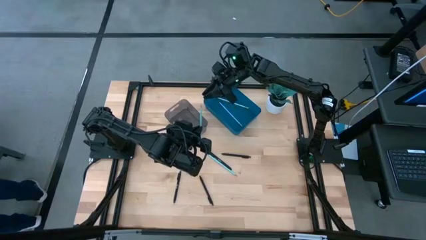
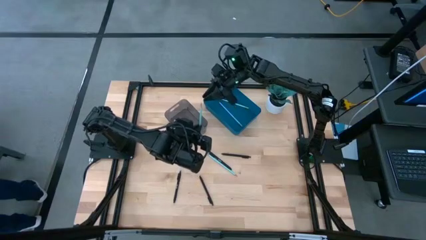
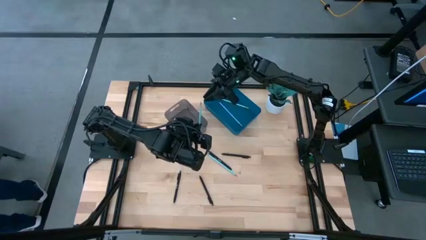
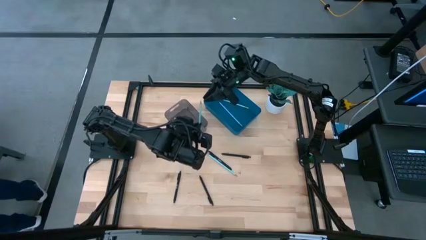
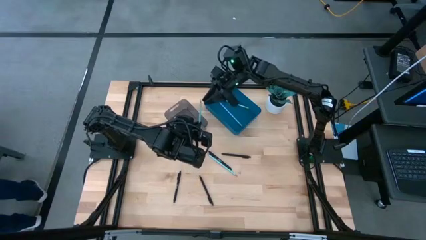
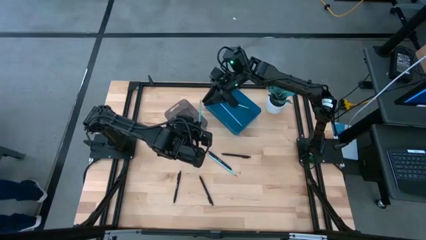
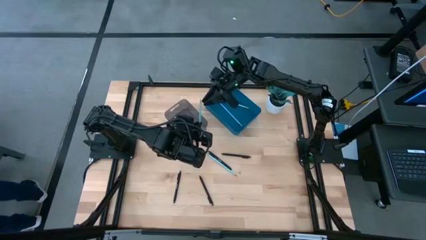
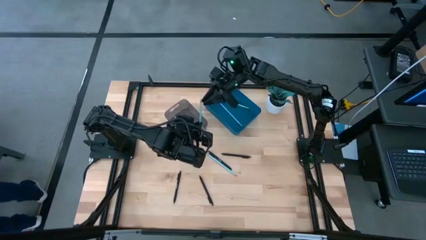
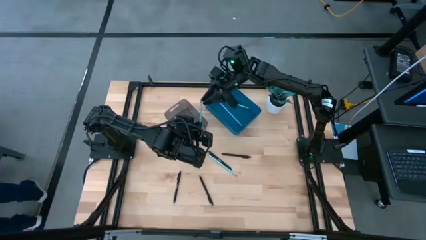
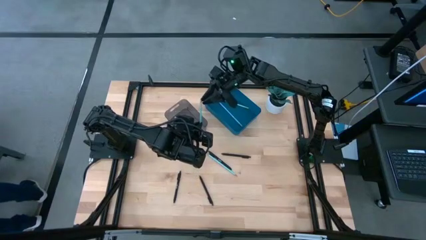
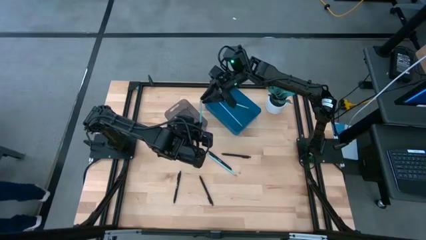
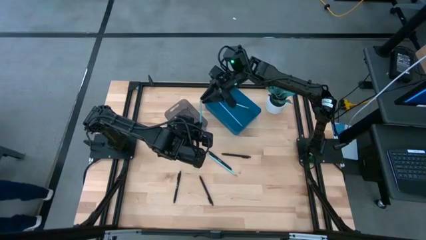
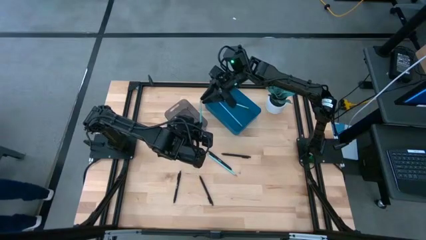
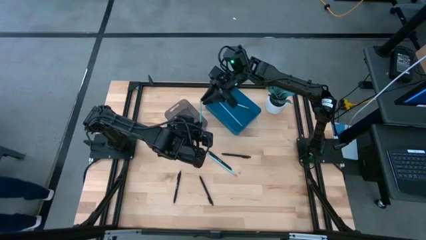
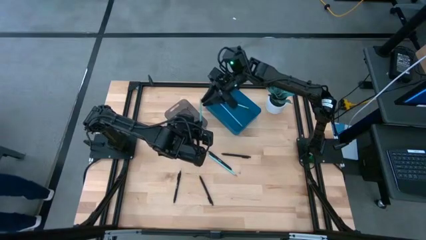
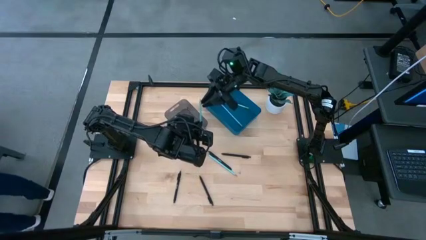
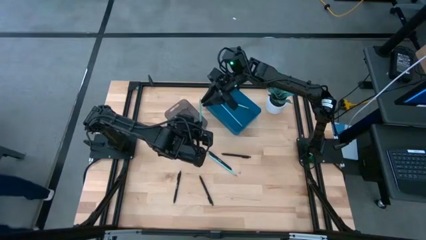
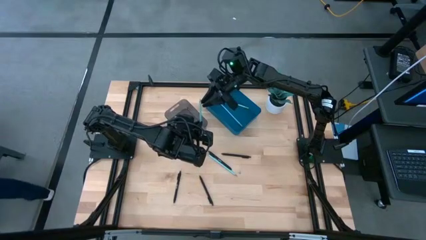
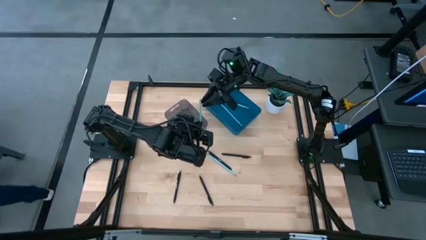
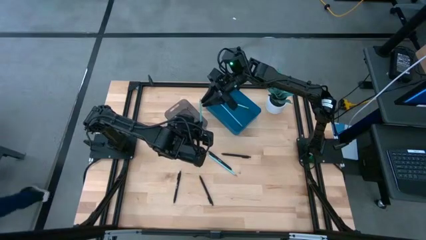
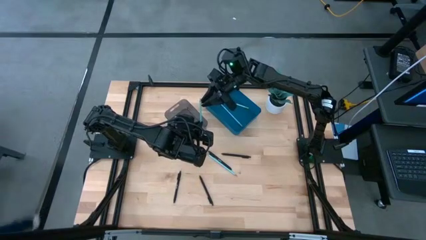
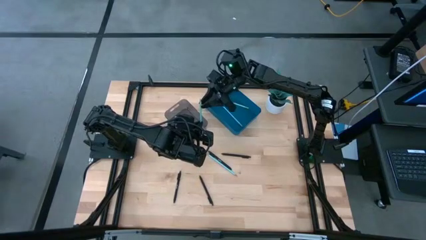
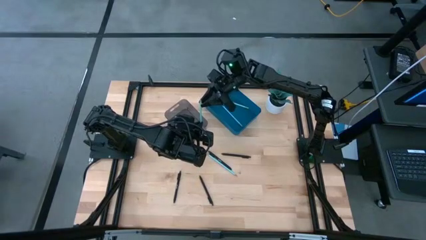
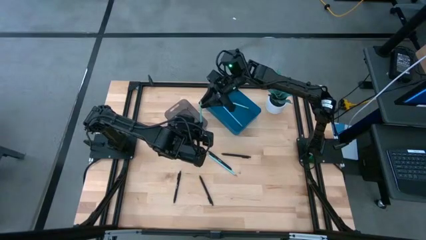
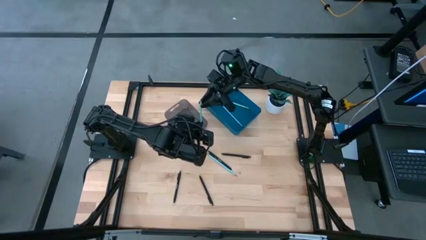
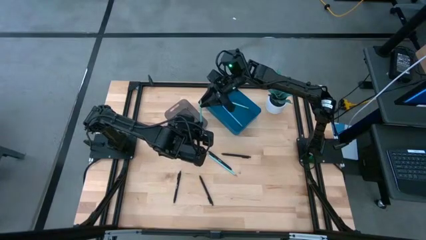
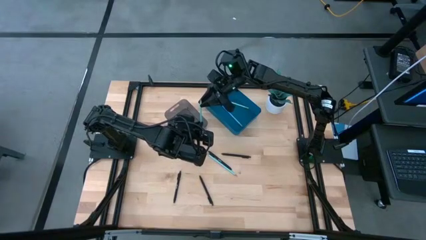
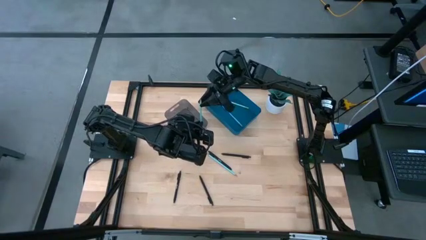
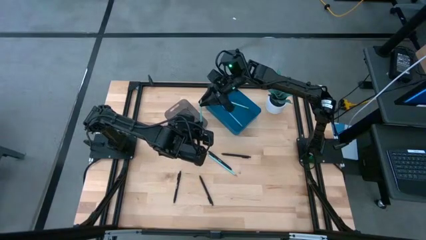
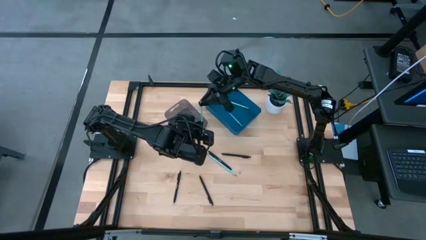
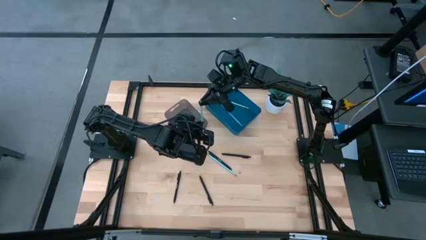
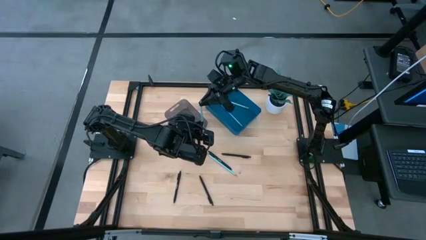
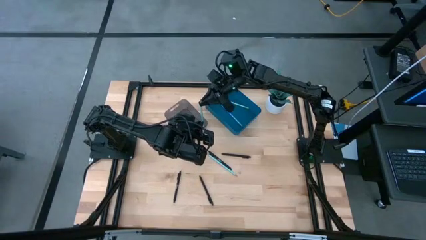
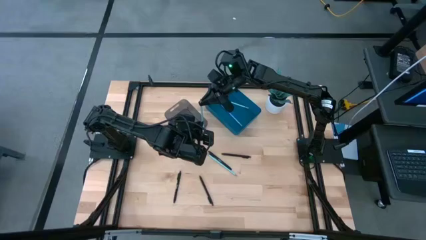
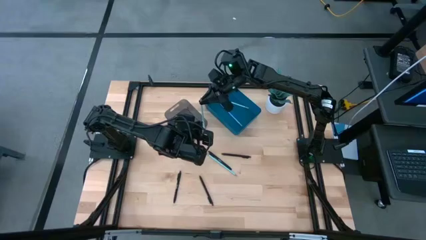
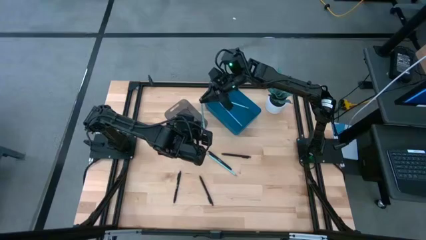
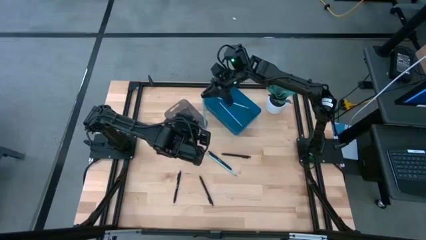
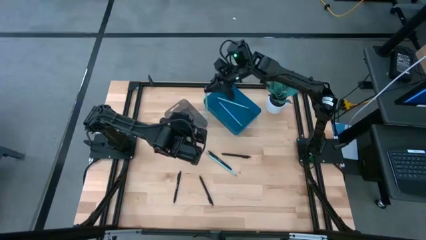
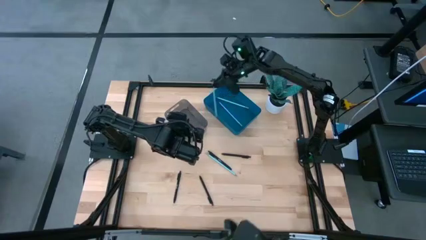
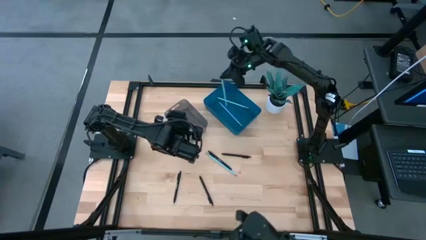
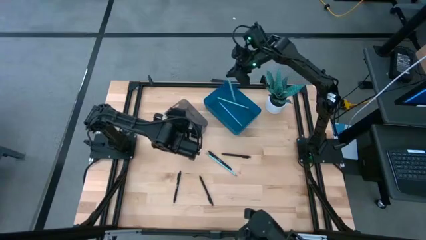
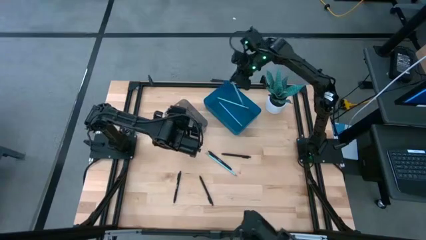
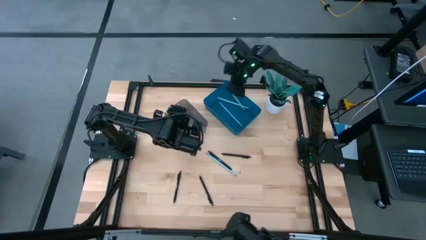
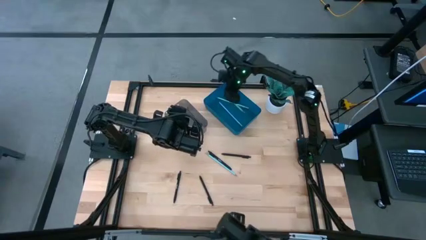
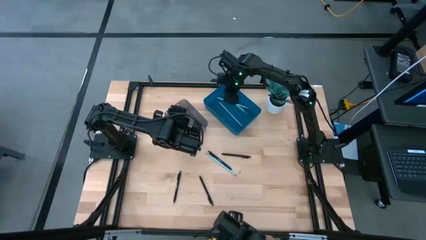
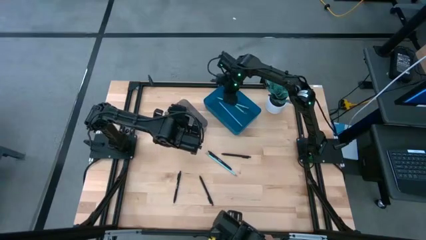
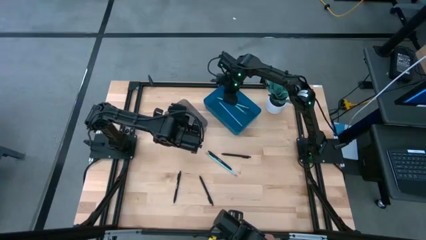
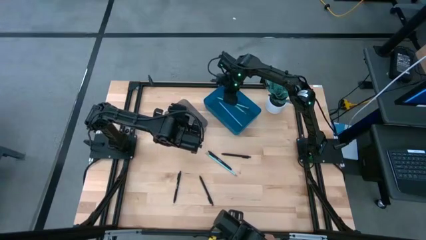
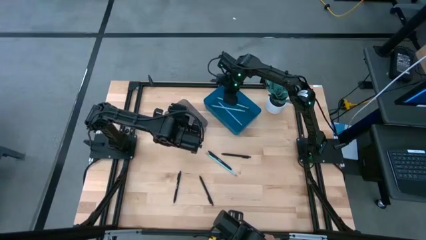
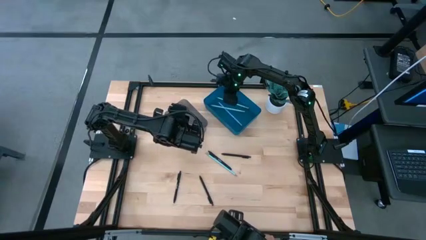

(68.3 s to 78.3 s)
Task: Sort pens & pencils
Put the light blue pencil into the blue bin

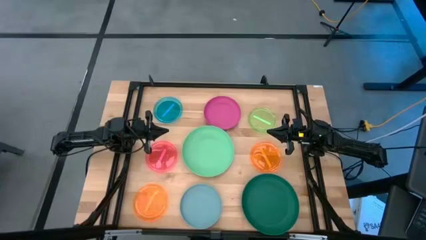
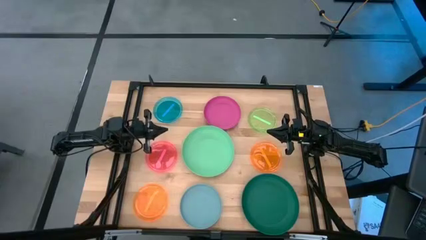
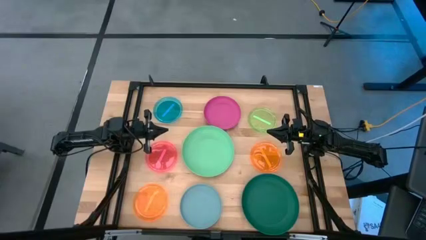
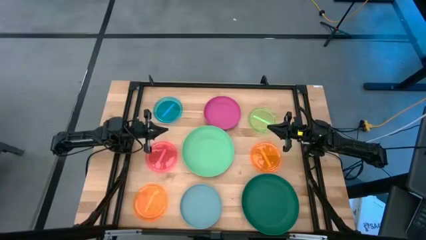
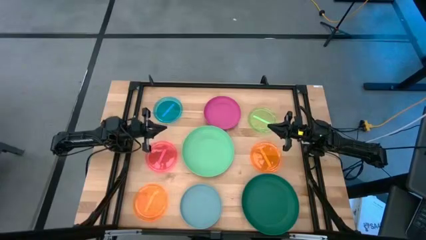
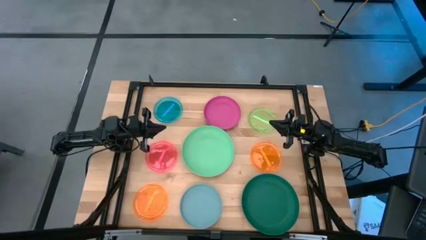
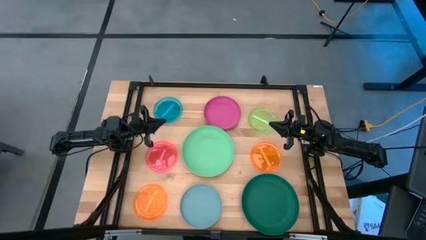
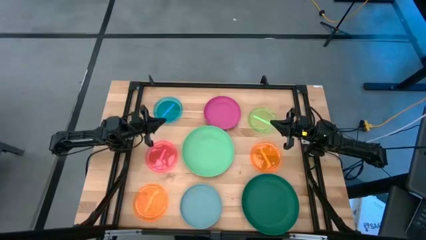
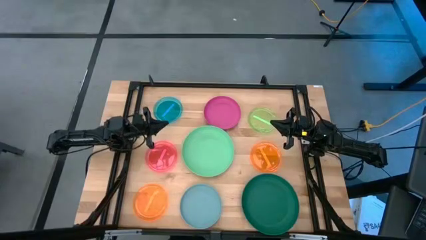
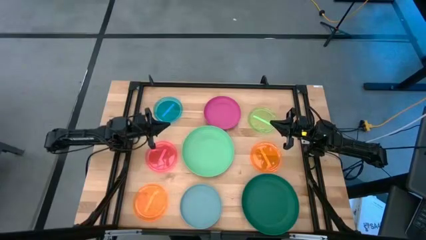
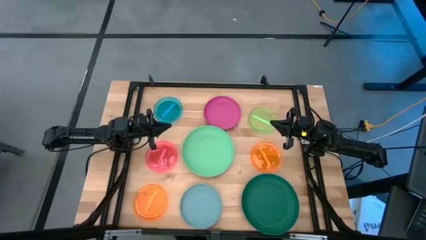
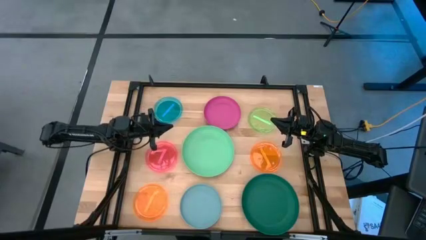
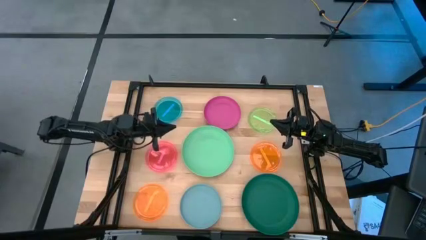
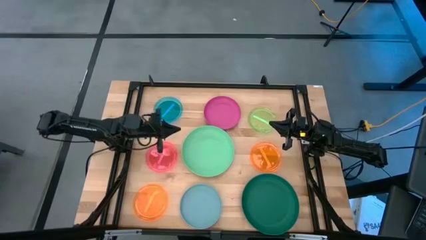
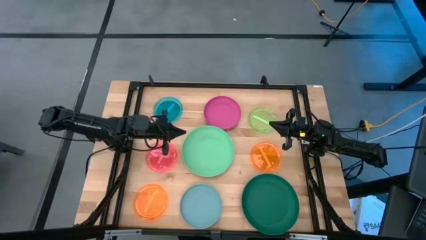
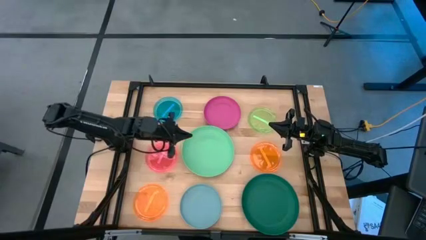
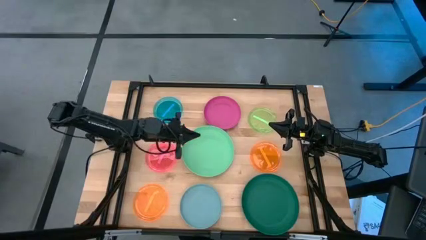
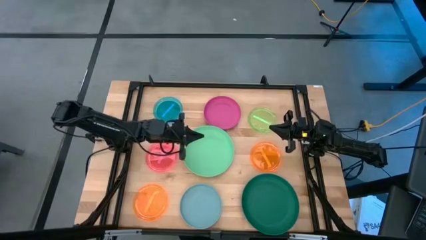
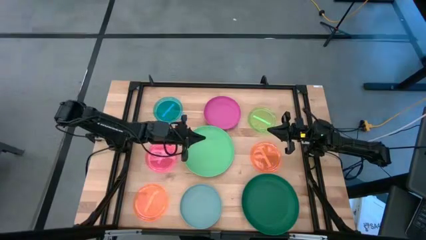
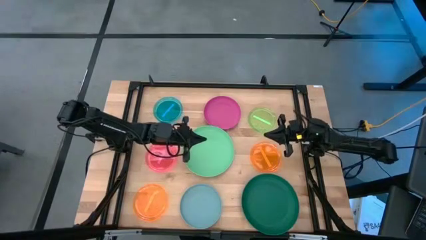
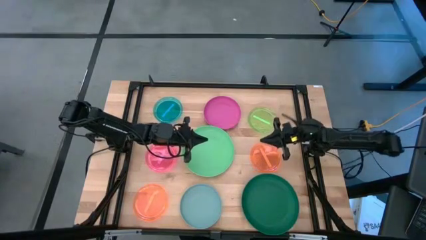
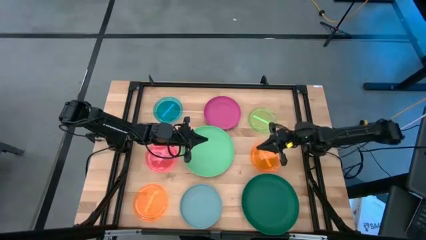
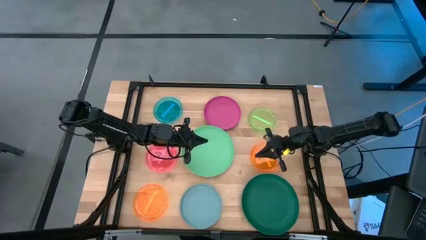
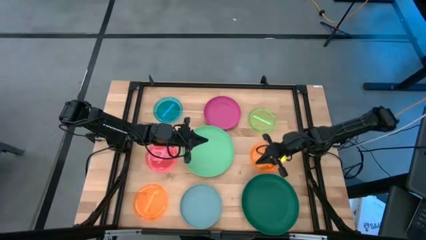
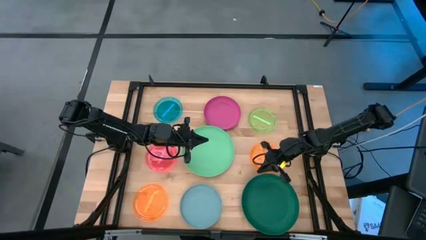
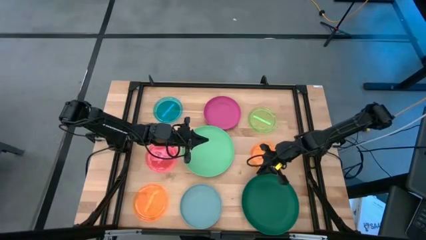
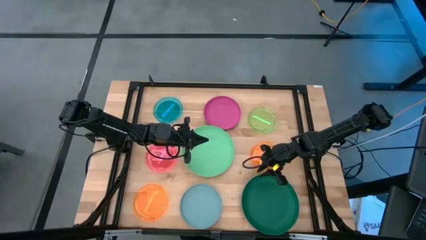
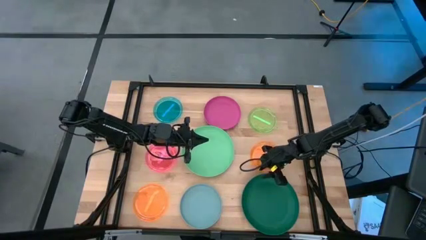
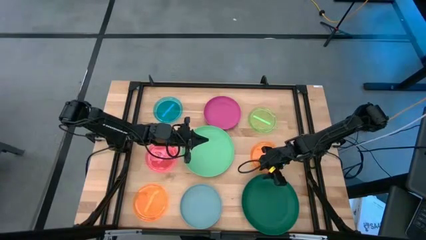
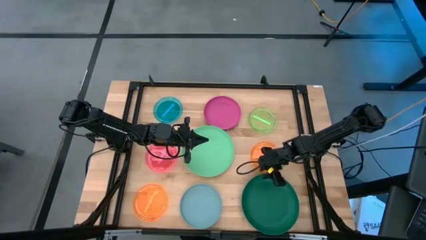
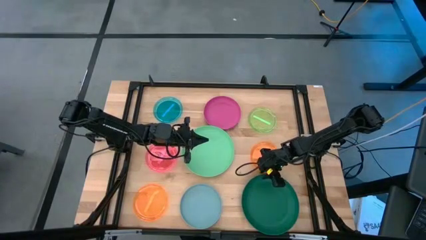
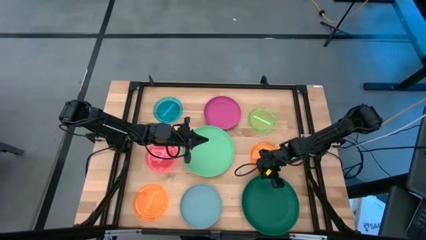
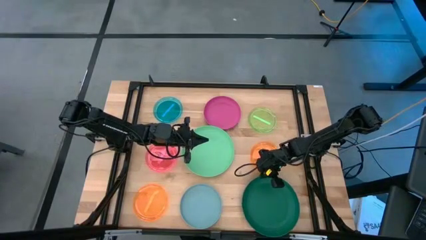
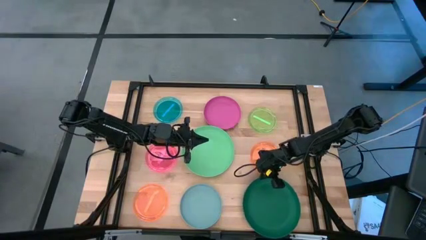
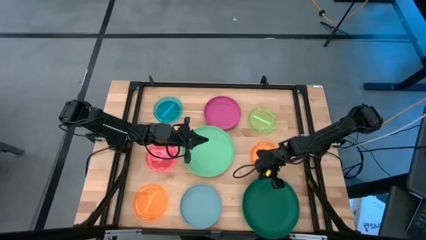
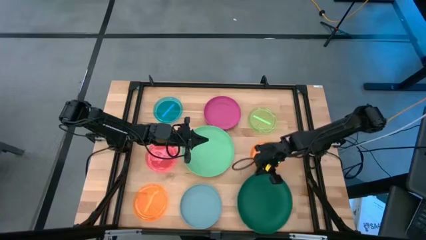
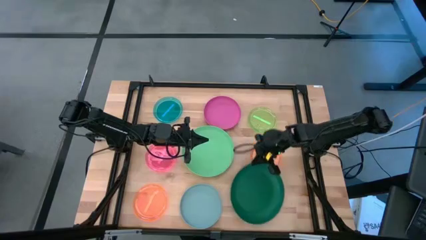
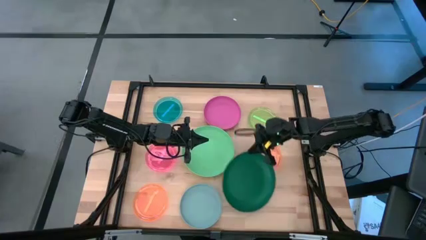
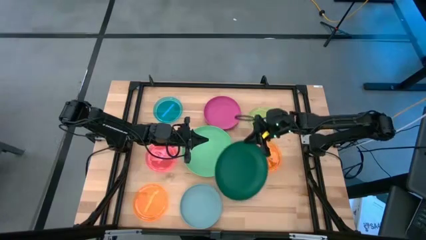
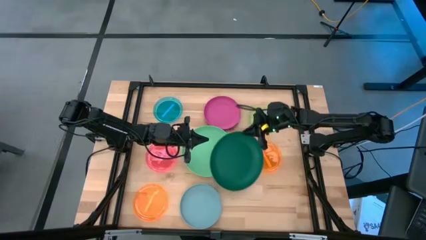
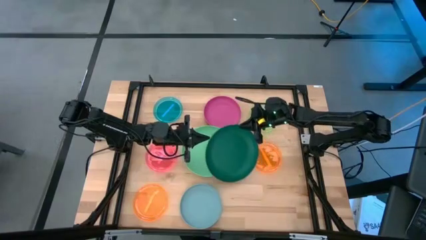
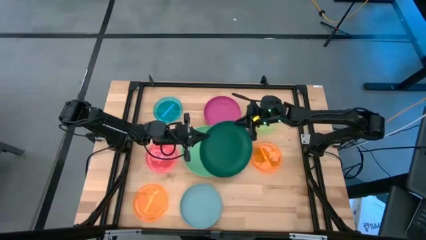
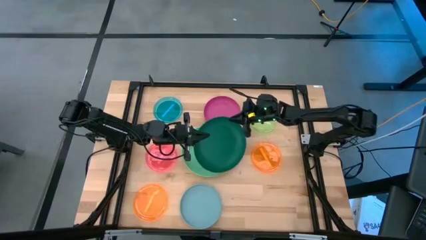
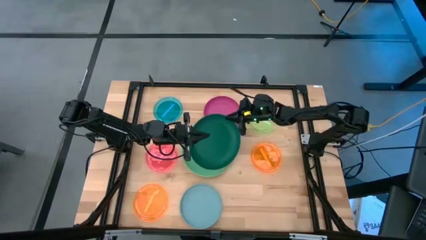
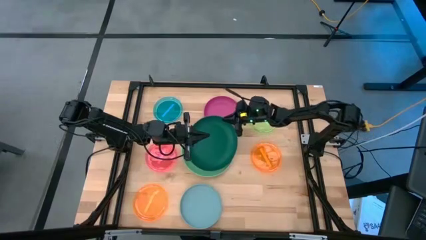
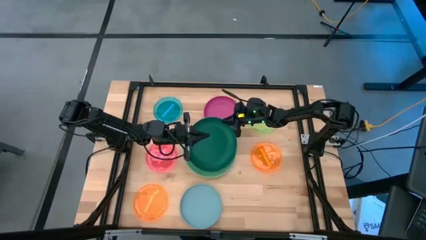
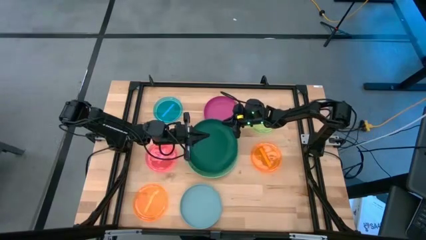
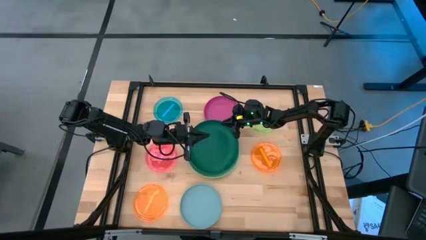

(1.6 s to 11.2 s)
Task: Stack plastic plates
Stack the dark green plate on top of the light green plate
